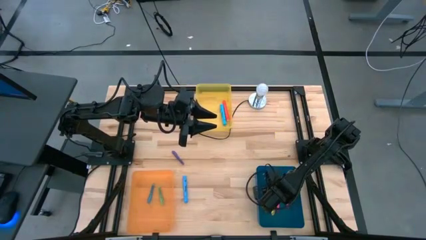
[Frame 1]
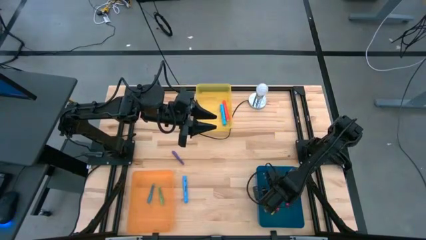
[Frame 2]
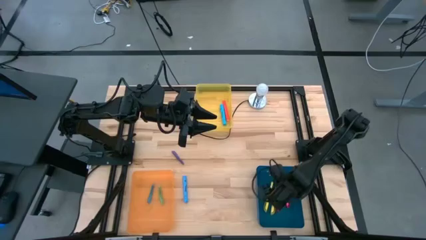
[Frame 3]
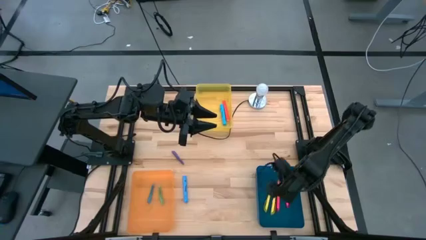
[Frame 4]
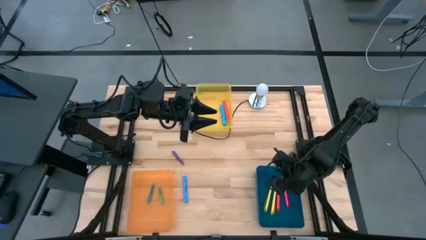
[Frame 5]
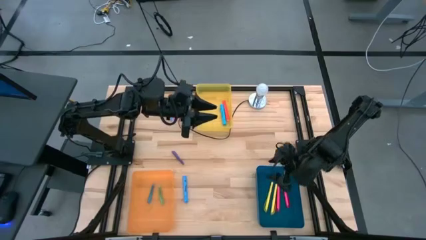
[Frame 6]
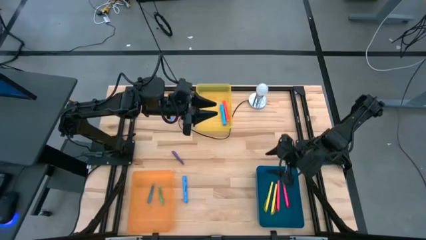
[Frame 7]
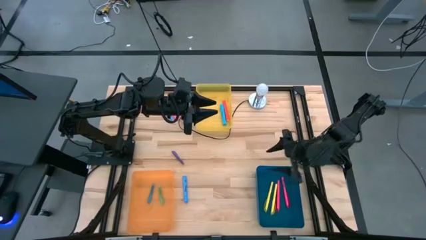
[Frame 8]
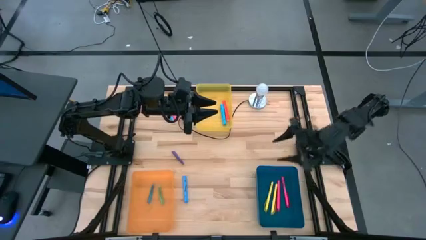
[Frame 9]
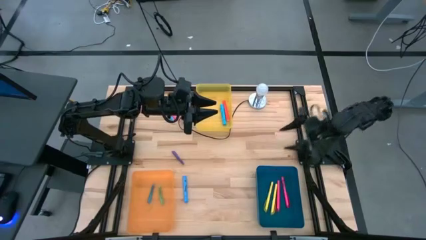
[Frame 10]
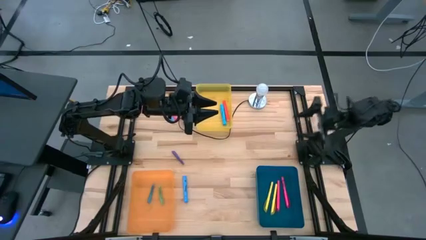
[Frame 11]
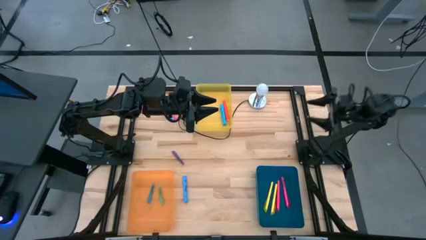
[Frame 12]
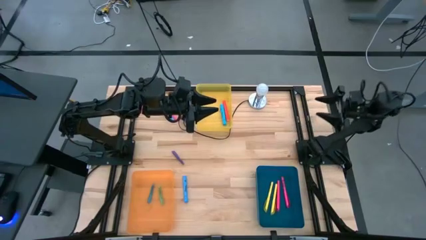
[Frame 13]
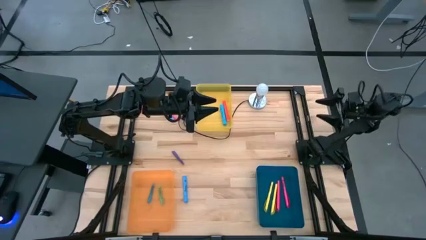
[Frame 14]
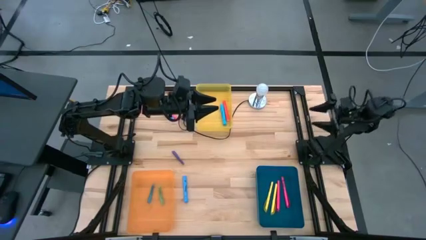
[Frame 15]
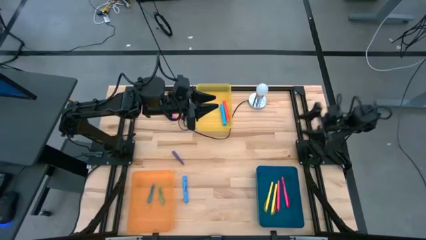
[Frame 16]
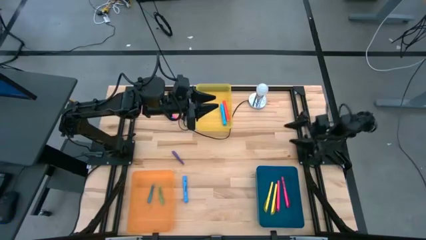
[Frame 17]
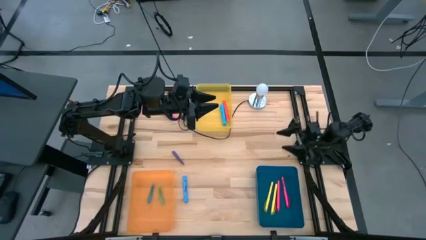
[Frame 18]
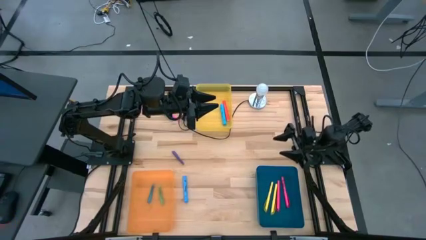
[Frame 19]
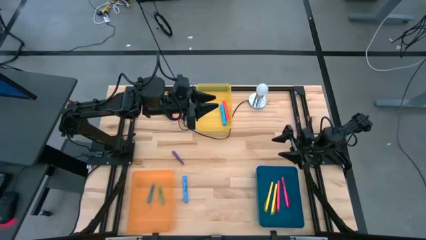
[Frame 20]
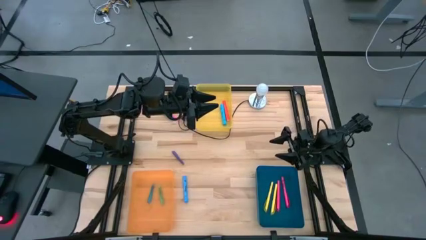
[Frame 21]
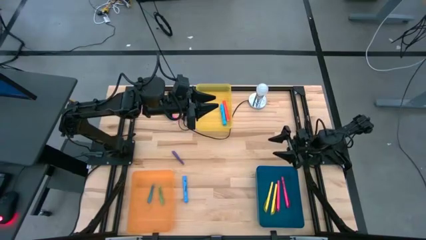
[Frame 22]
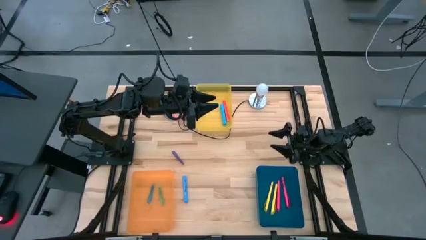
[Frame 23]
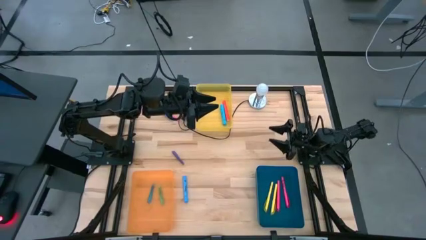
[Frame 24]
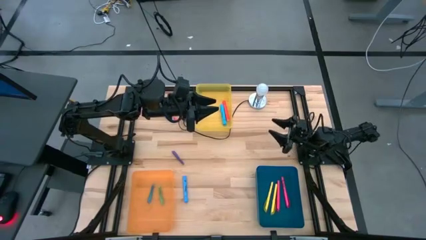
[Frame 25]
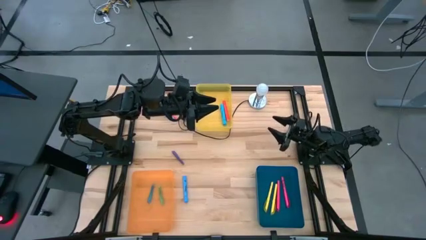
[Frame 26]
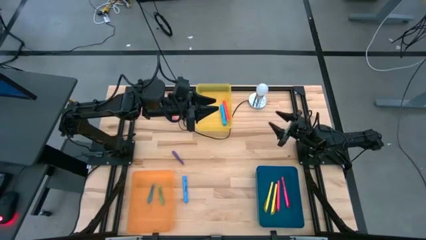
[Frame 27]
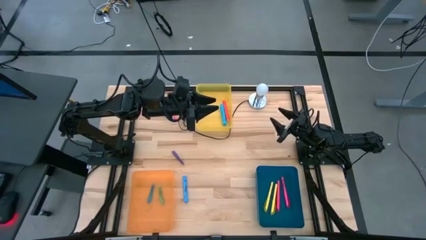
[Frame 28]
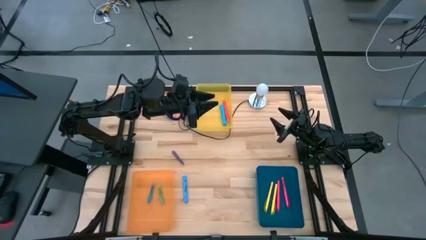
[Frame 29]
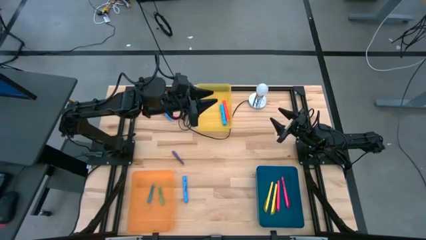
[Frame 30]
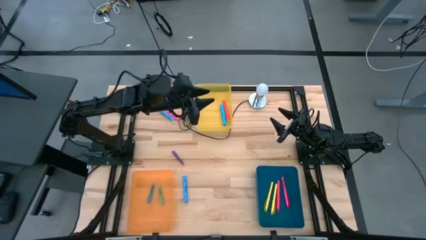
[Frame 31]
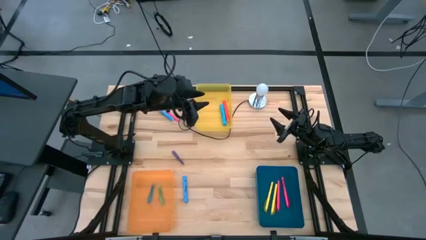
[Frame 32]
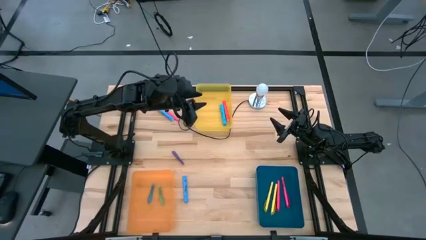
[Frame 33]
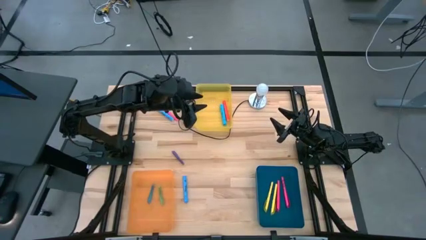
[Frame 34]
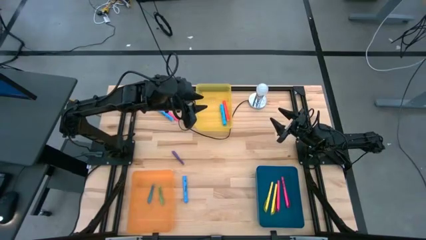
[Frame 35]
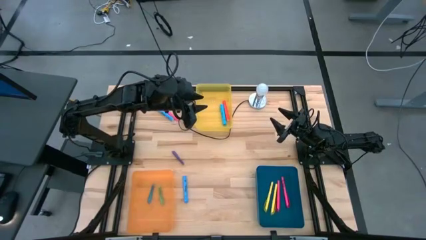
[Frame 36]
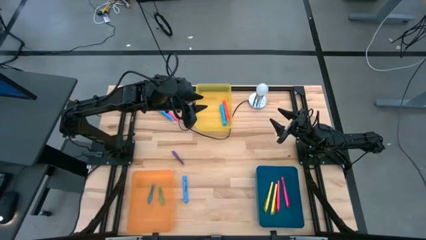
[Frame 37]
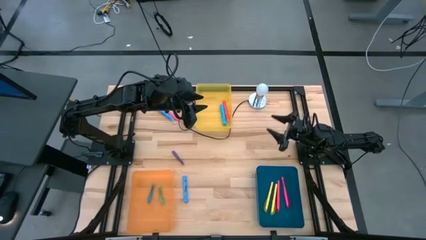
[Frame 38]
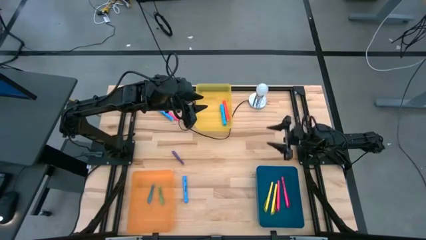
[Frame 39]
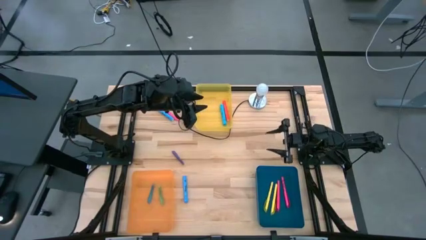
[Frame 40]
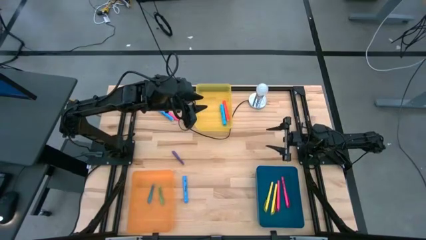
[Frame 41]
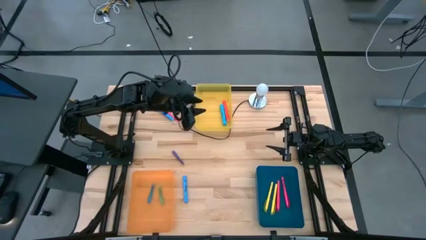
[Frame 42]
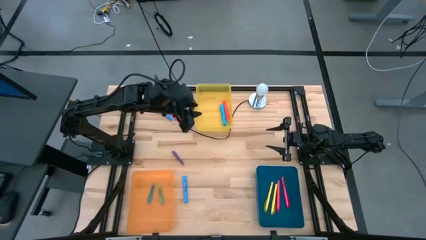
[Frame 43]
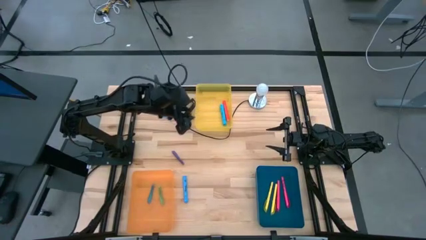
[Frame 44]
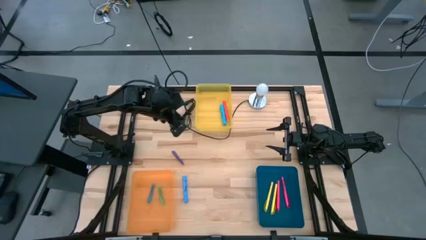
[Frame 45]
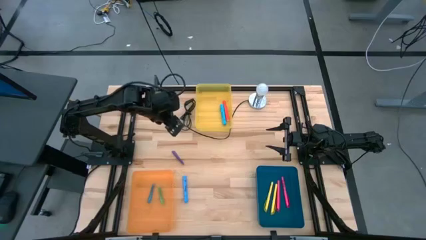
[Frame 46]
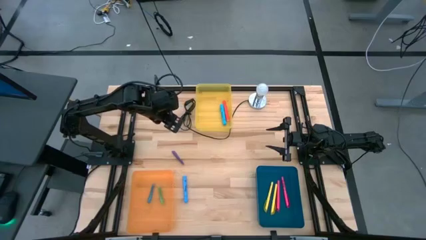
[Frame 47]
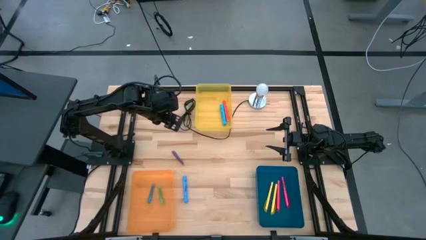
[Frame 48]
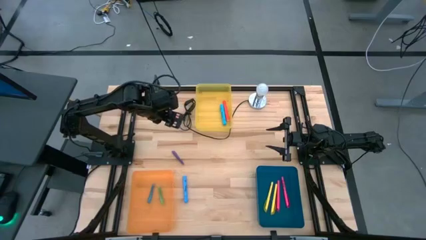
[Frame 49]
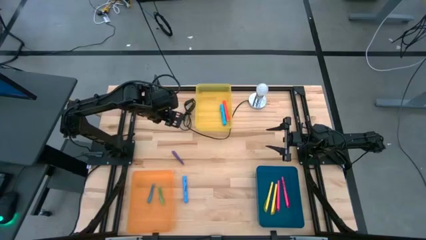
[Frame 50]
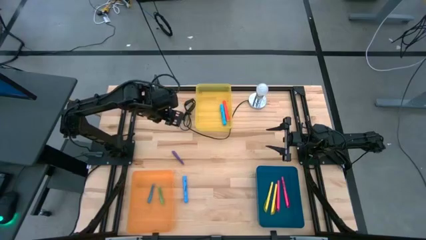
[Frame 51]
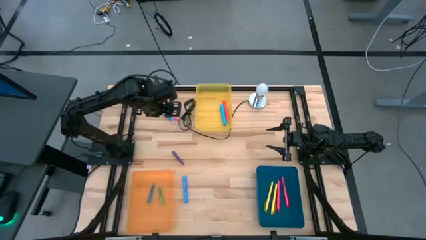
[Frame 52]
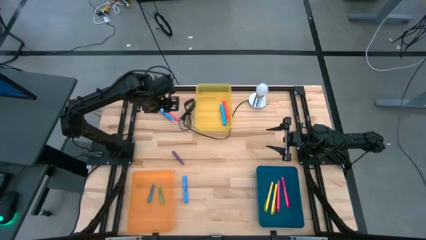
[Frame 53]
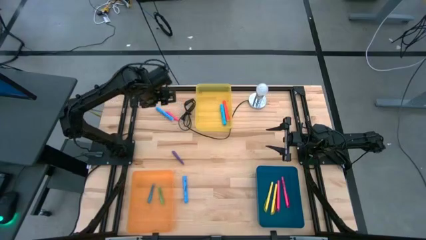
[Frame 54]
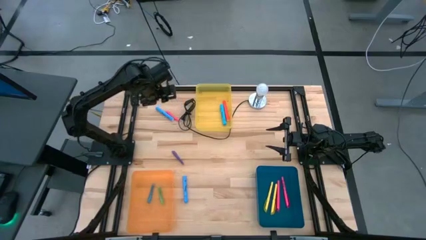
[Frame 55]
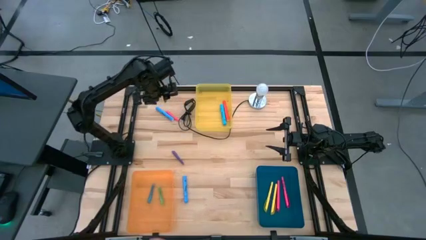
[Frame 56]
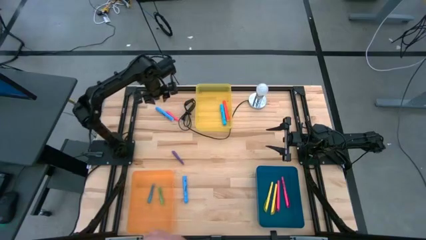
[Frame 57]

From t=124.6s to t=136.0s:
Task: Pick & Place Markers
Put the top blue highlighter into the yellow bin

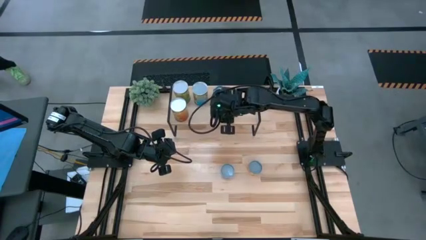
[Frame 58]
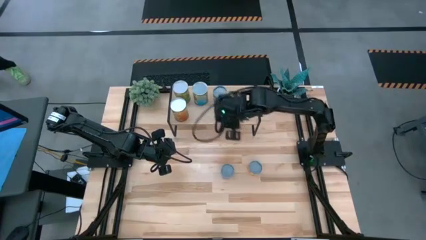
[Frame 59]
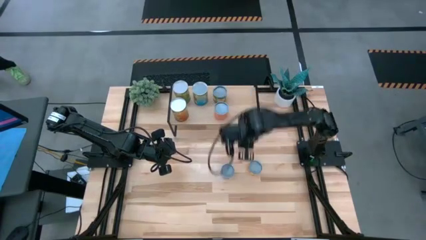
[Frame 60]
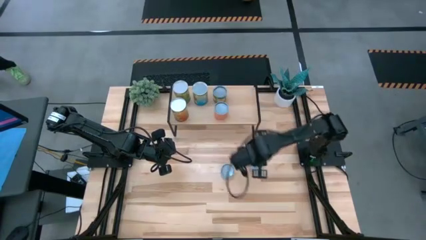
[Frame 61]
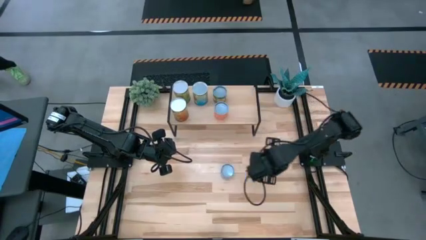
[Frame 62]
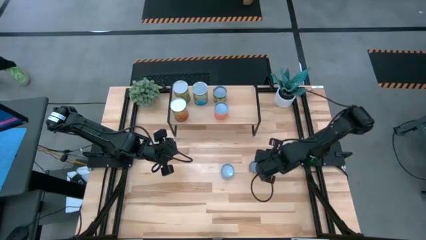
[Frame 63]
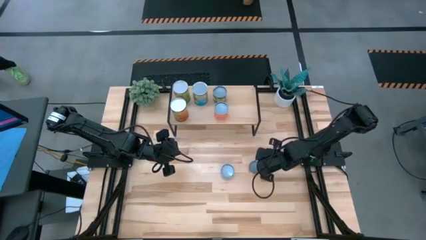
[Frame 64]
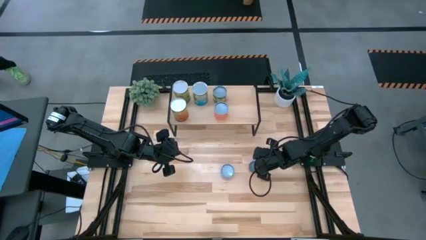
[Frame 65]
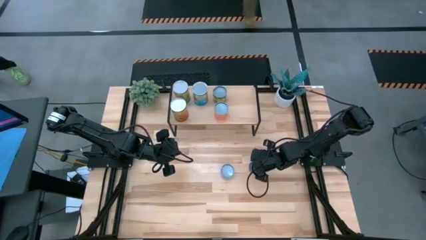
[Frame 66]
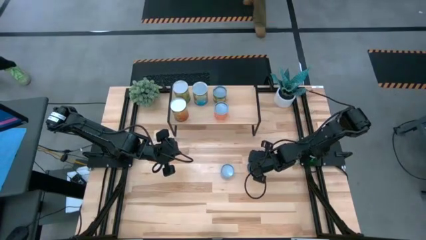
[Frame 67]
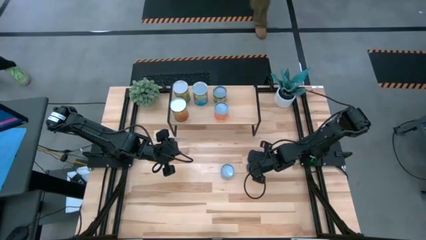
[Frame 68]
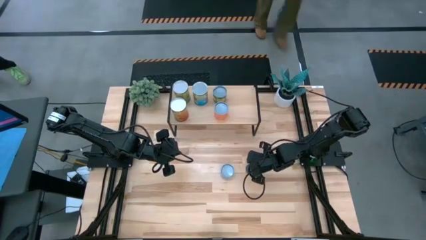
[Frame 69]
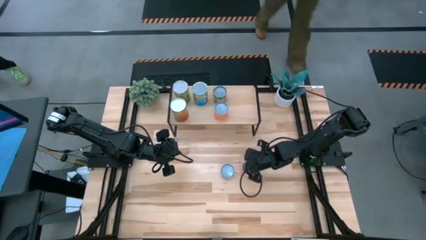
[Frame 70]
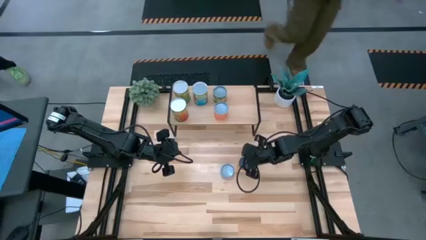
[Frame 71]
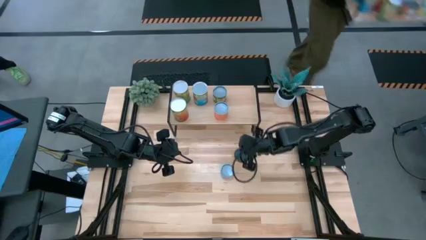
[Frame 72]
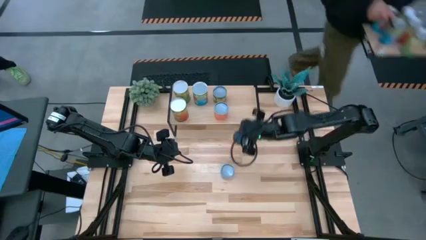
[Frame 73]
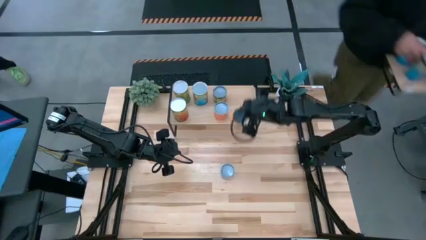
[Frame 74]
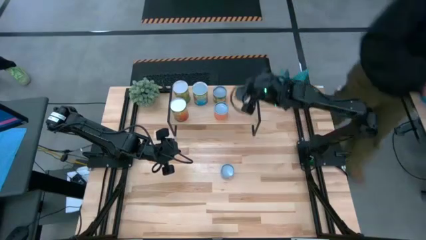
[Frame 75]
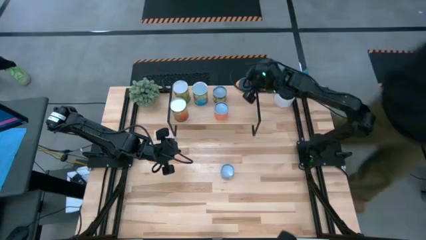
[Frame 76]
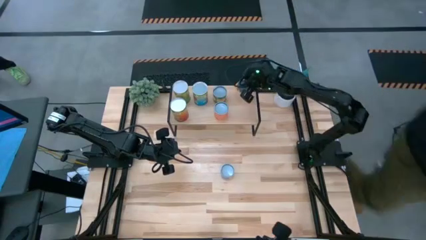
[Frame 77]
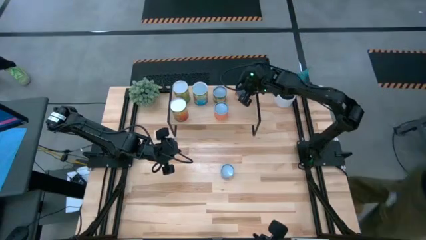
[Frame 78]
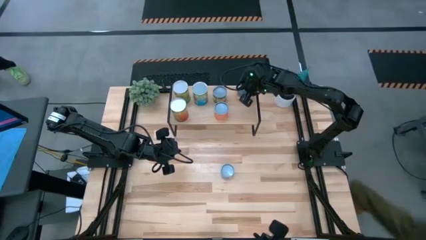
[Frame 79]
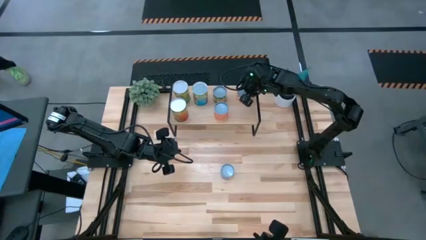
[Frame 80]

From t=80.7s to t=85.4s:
Task: Pick and place cans onto a shelf
Put the canned pineapple rings on the shelf
